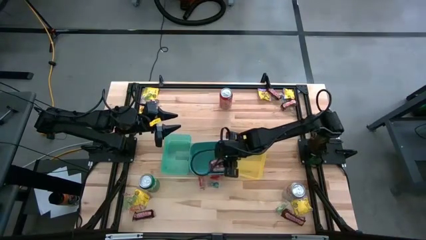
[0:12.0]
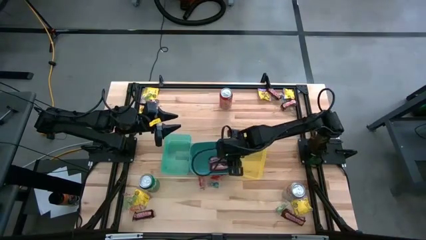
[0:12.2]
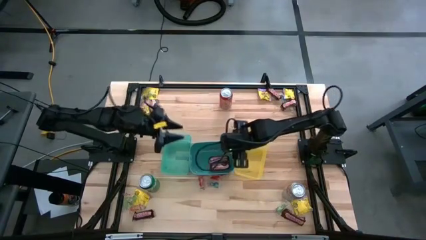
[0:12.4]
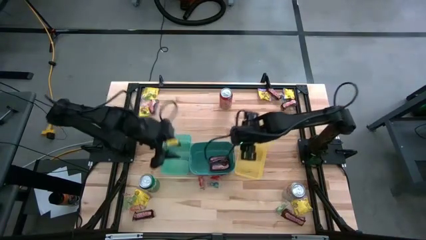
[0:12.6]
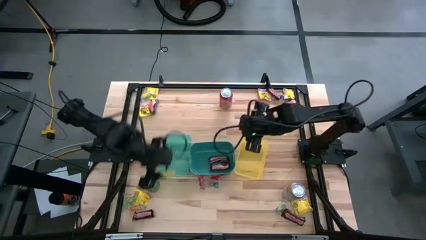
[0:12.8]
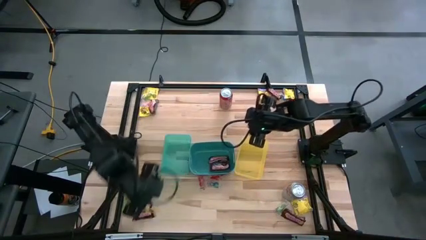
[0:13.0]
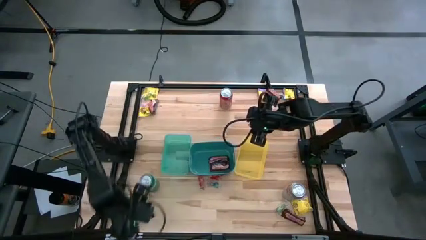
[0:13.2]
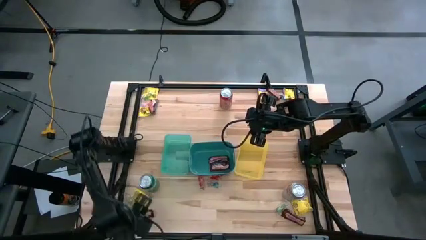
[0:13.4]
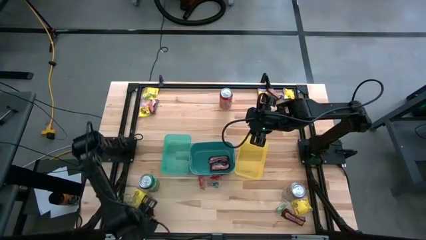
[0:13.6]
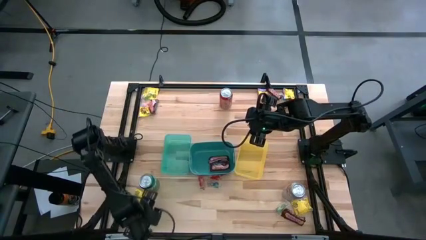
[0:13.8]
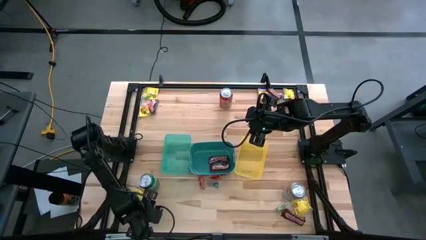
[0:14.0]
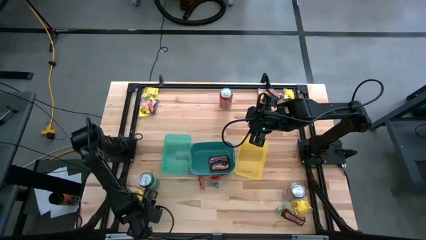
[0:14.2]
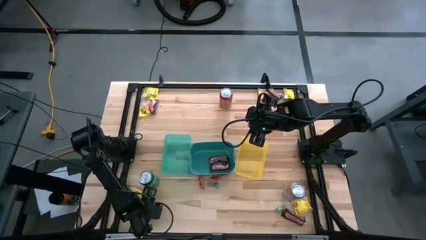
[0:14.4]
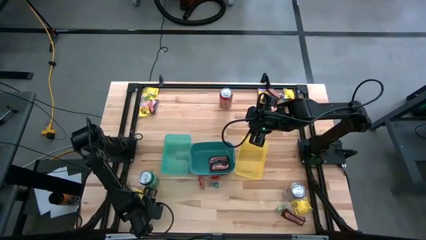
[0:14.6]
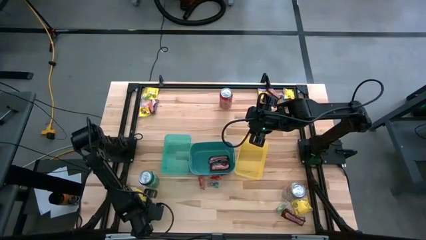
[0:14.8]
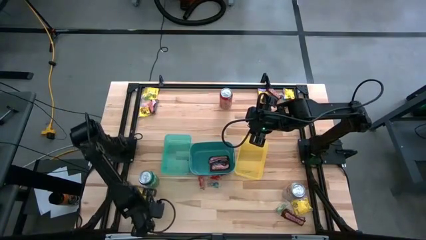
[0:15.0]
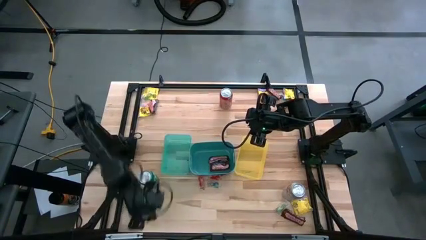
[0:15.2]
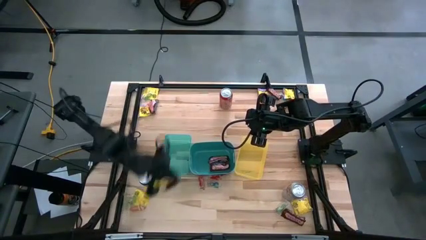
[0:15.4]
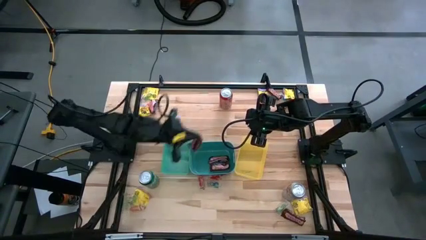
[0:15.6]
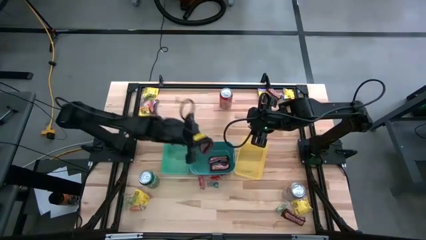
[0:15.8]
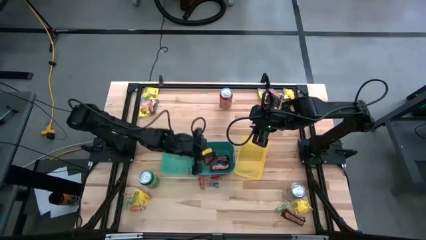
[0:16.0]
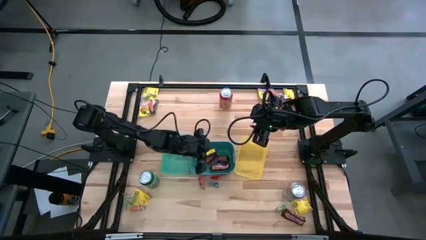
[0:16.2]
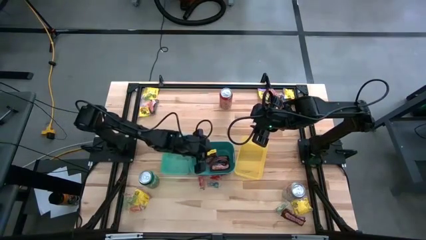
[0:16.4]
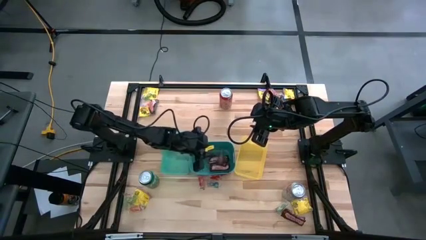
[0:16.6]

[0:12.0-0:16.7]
Task: Sort candy
Put the chocolate bar into the blue bin

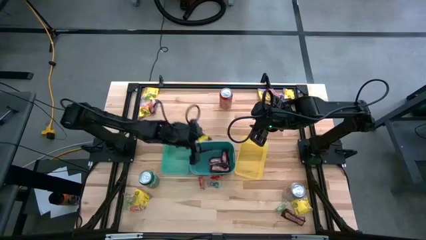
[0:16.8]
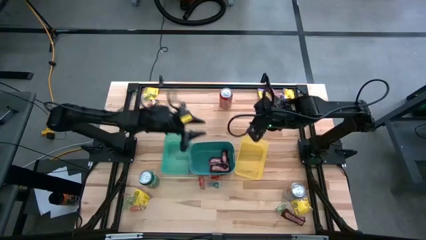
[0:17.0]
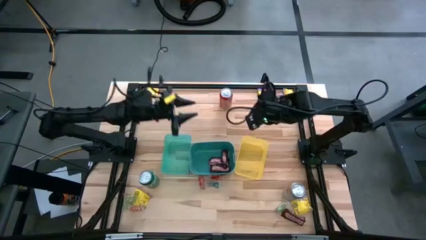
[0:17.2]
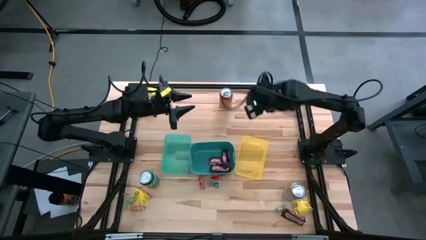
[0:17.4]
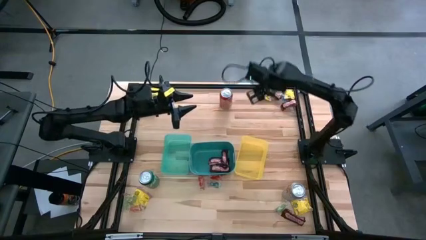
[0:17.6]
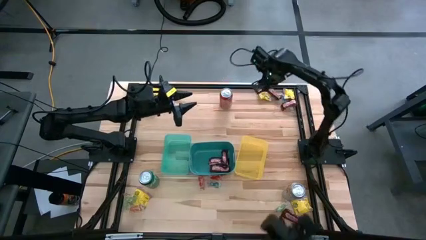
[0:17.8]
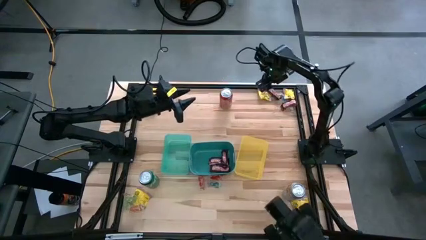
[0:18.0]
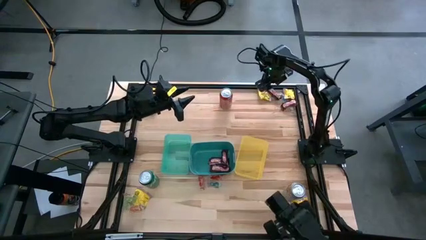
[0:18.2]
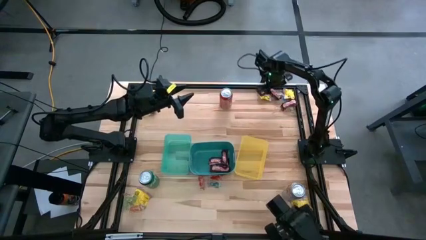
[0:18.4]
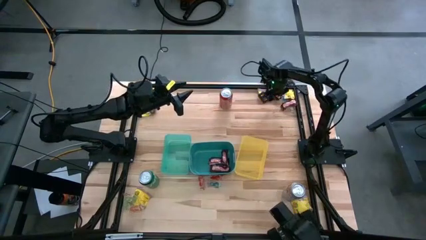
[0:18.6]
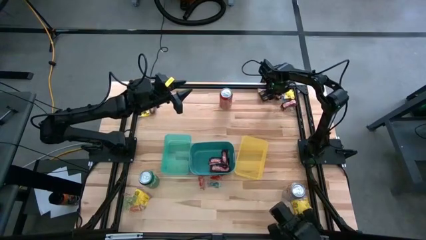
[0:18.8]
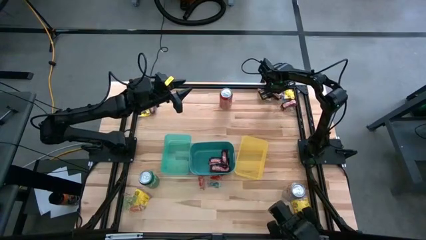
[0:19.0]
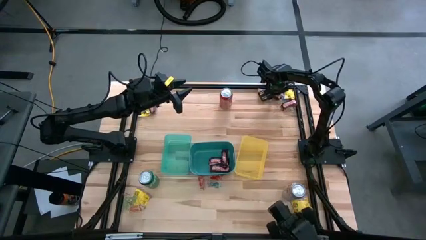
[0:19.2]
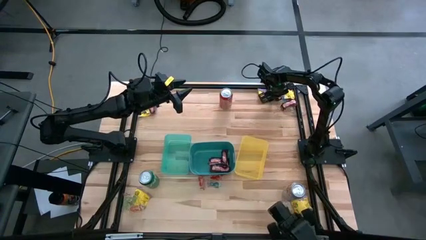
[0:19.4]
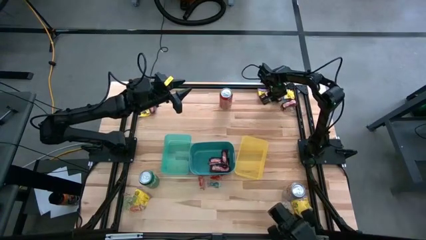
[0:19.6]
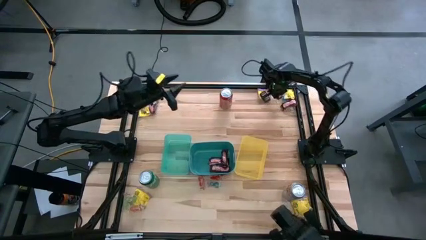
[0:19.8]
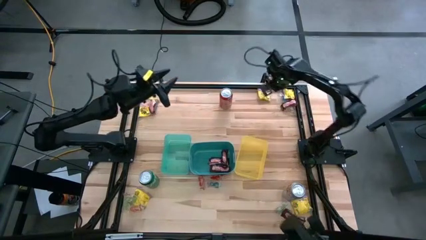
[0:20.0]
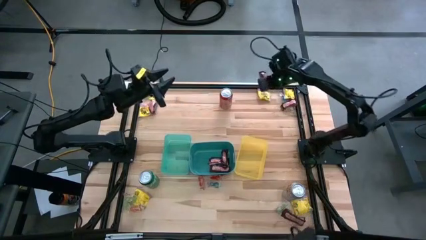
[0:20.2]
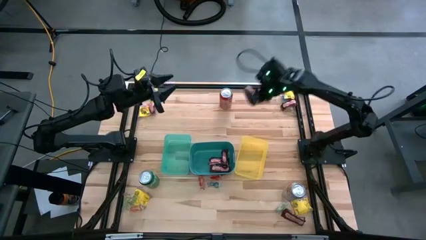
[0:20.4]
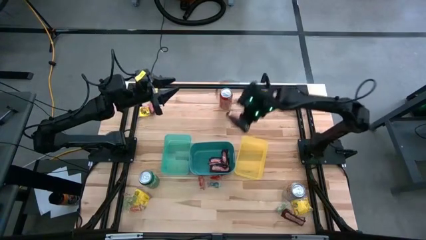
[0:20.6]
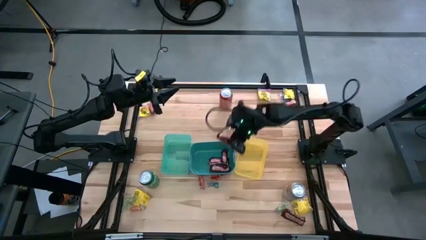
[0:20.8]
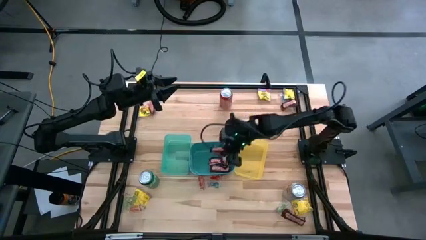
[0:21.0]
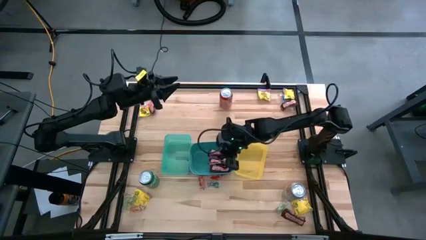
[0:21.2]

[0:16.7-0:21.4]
Put the chocolate bar into the blue bin

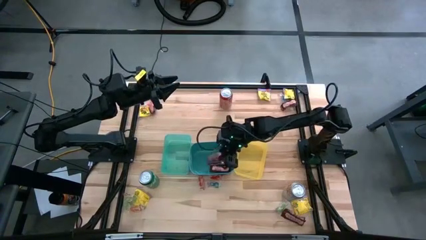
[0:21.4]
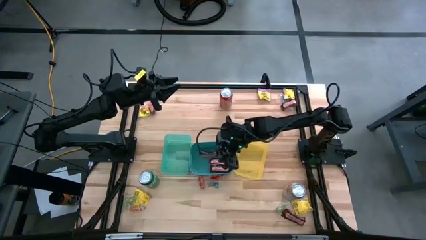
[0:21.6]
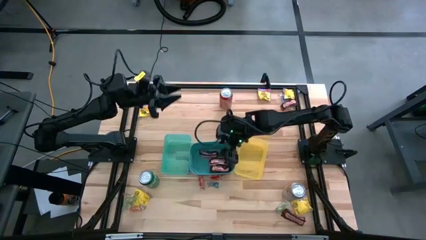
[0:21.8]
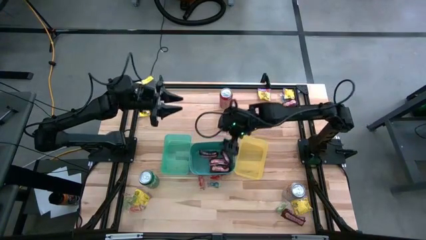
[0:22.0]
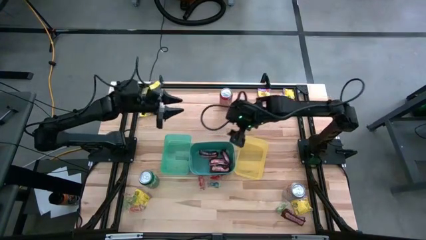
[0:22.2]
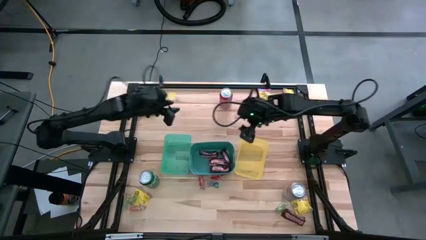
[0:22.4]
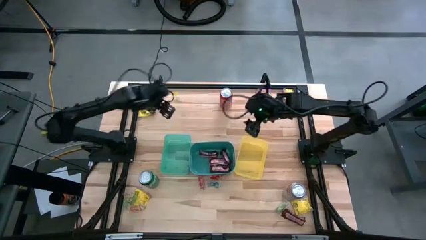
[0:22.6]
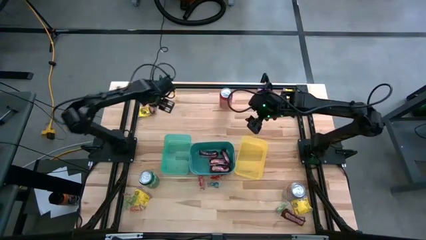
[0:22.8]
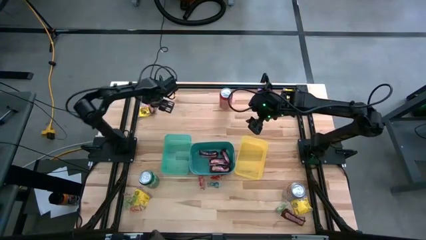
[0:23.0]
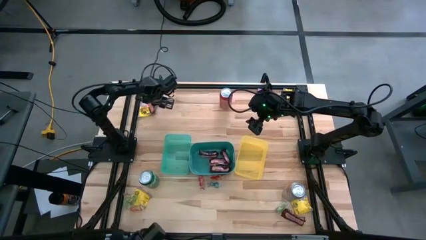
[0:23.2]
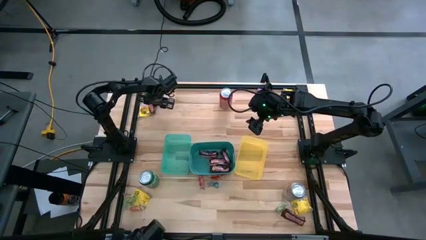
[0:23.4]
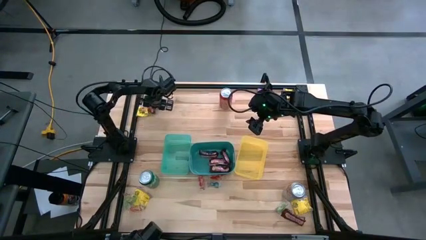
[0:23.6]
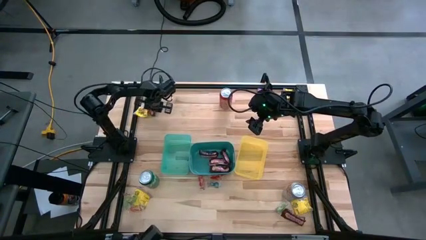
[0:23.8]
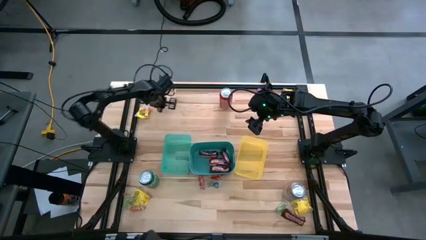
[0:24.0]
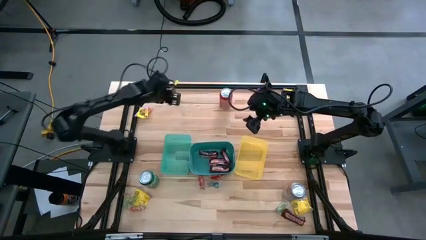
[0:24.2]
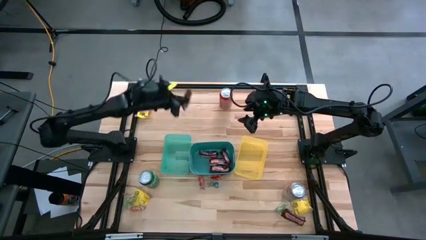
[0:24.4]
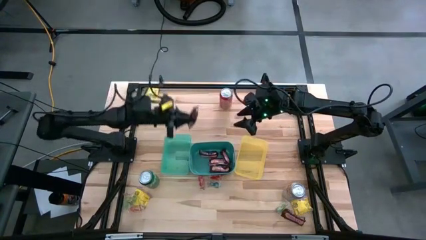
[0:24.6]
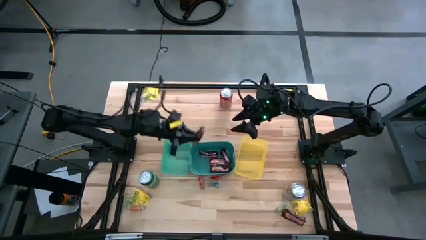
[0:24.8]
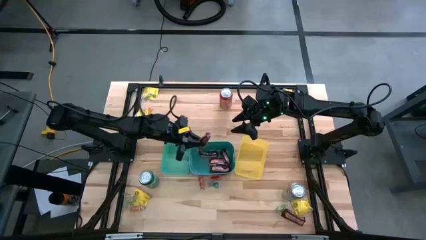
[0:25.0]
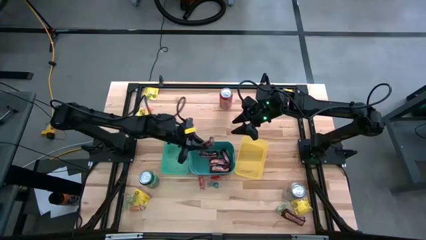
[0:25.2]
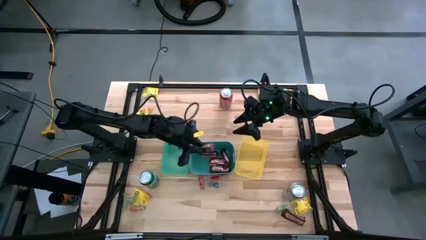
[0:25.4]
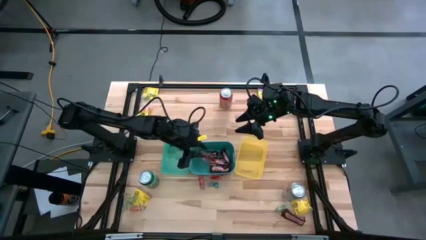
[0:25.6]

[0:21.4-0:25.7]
Put the chocolate bar into the blue bin

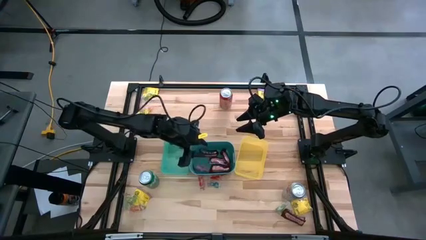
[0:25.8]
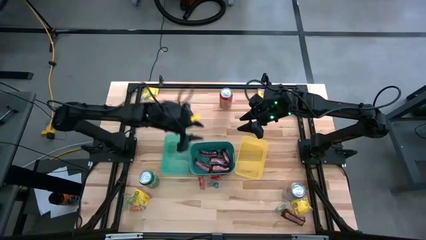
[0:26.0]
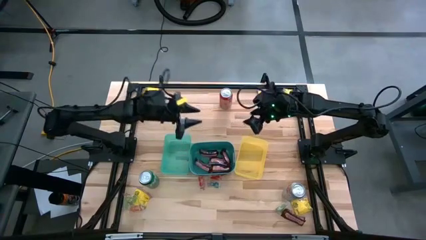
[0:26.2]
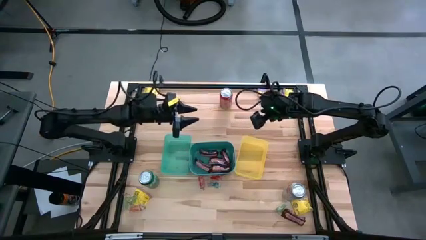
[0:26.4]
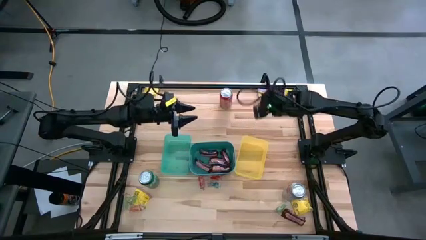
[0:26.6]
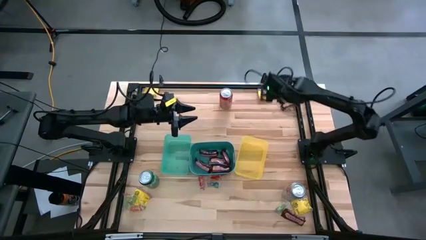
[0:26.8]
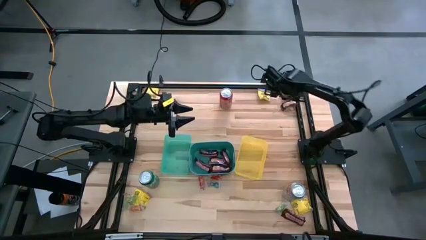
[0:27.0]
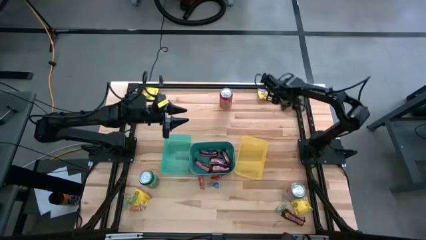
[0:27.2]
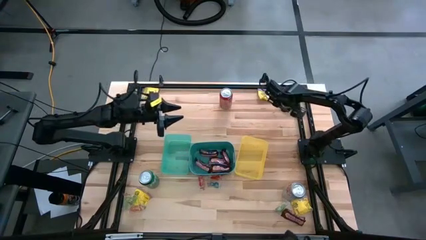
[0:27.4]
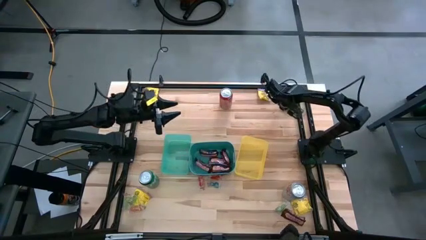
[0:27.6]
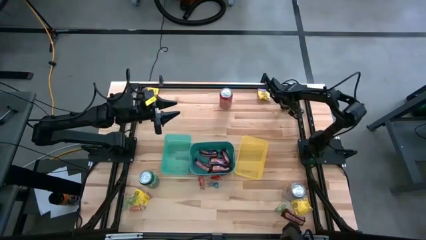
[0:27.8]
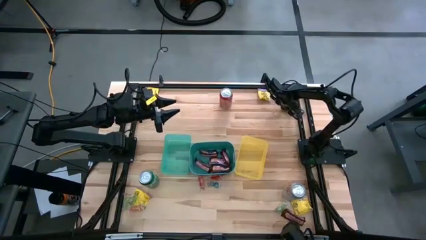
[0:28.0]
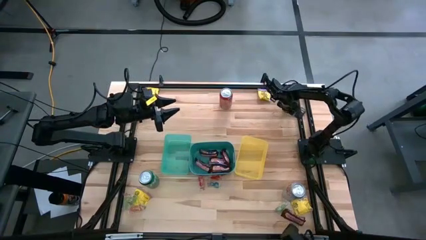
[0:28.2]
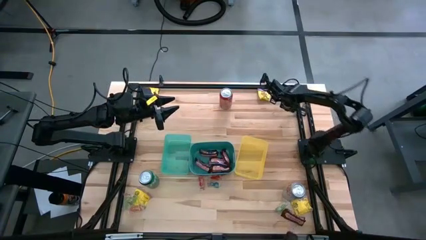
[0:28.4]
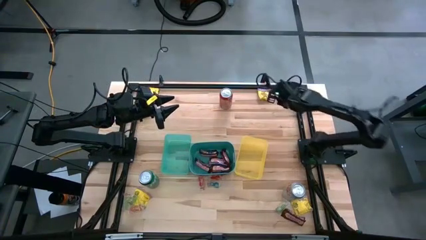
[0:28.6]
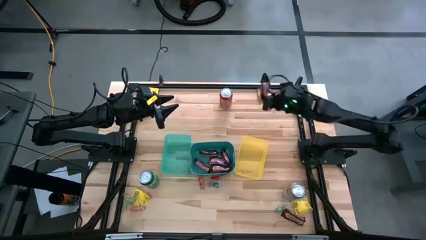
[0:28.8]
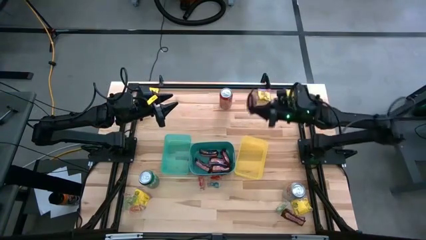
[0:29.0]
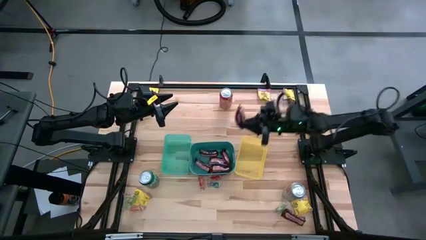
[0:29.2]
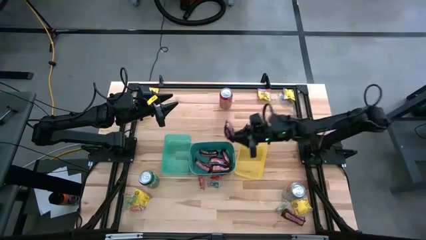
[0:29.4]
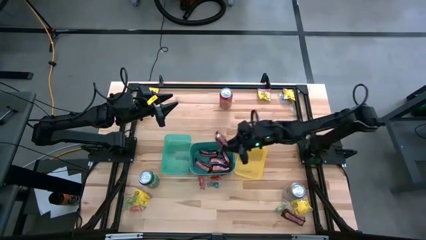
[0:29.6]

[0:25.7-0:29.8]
Put the chocolate bar into the blue bin
